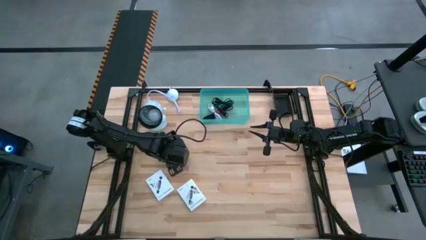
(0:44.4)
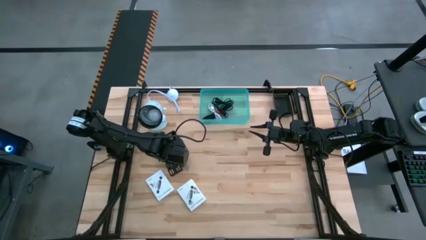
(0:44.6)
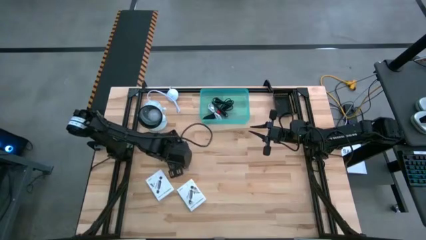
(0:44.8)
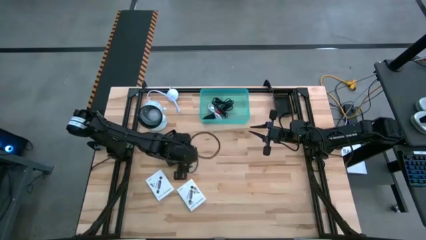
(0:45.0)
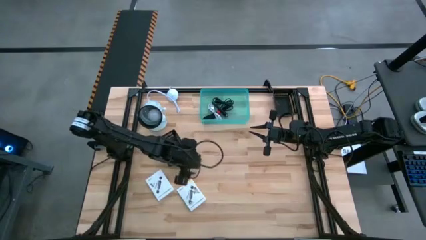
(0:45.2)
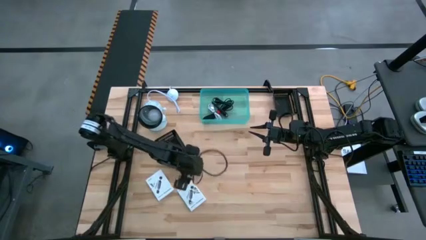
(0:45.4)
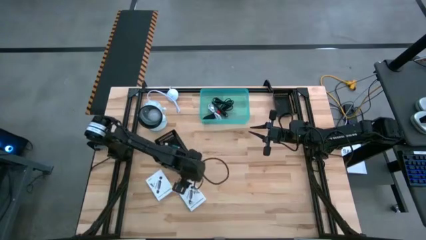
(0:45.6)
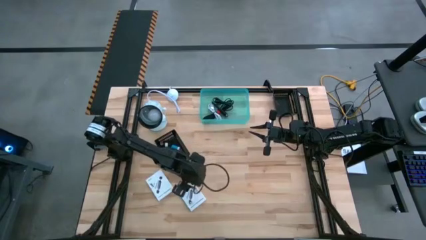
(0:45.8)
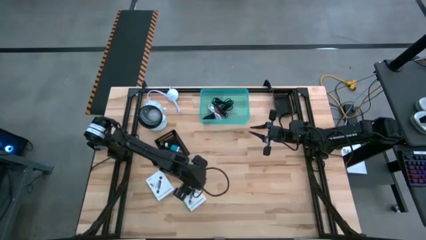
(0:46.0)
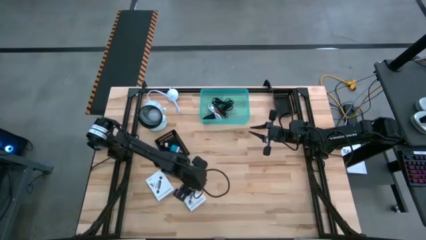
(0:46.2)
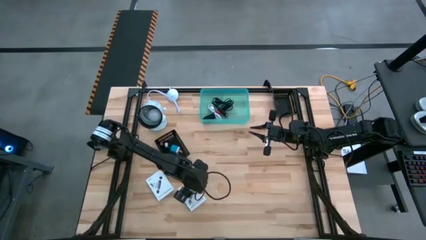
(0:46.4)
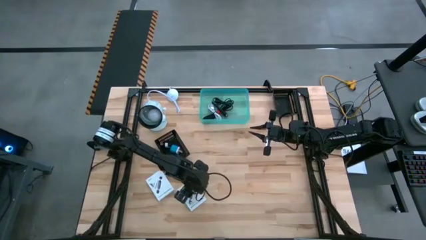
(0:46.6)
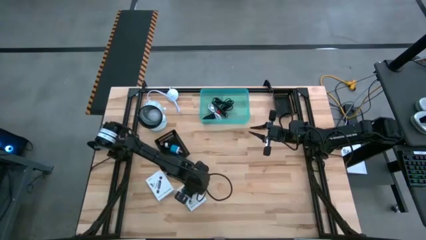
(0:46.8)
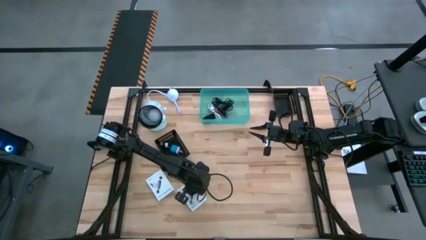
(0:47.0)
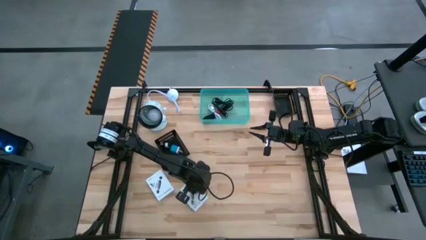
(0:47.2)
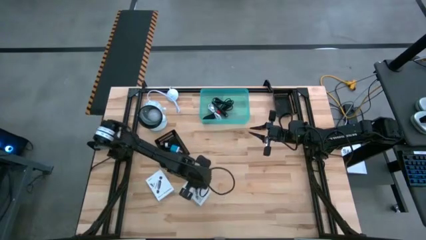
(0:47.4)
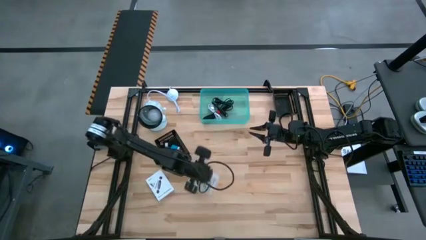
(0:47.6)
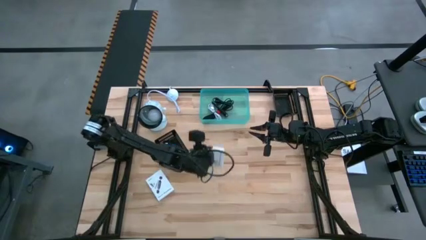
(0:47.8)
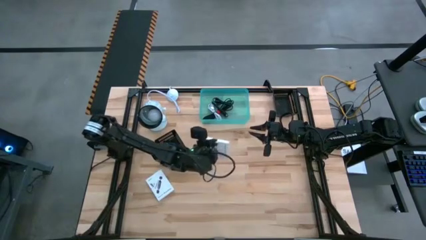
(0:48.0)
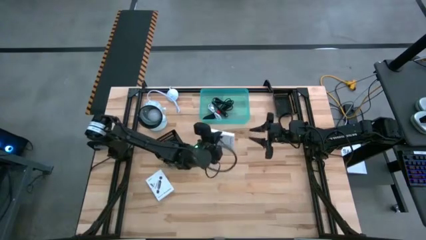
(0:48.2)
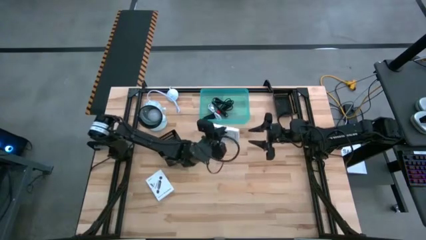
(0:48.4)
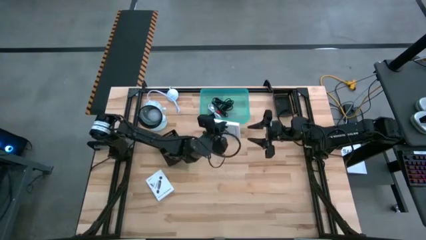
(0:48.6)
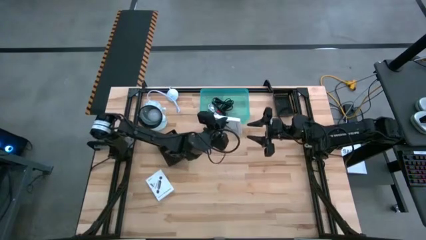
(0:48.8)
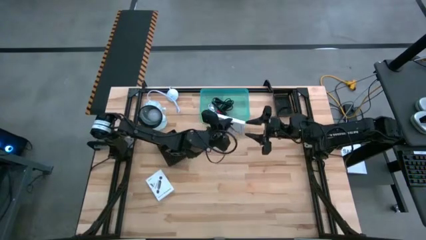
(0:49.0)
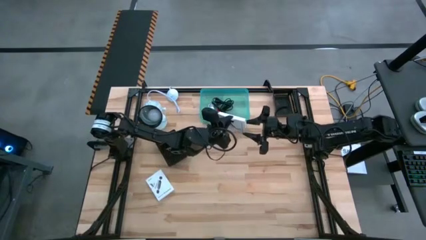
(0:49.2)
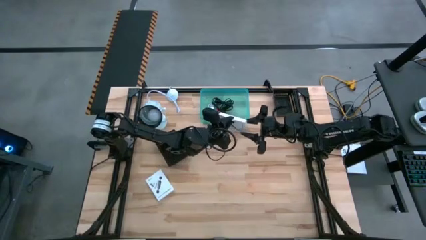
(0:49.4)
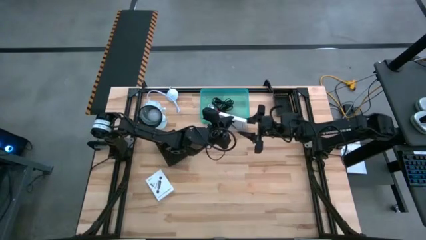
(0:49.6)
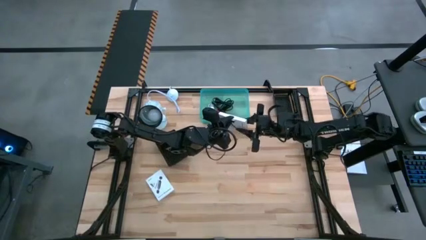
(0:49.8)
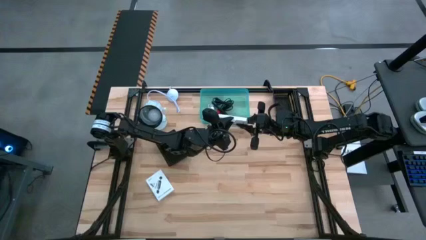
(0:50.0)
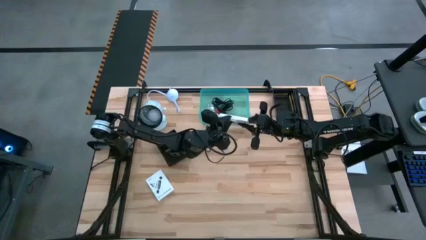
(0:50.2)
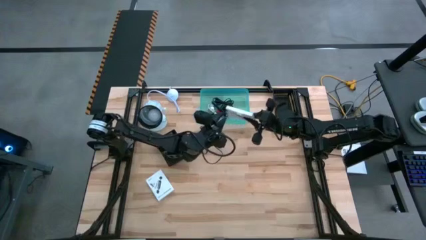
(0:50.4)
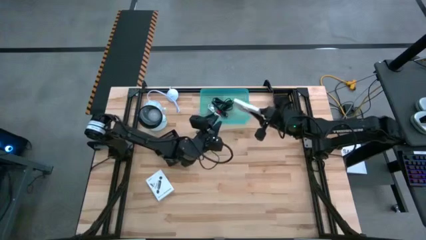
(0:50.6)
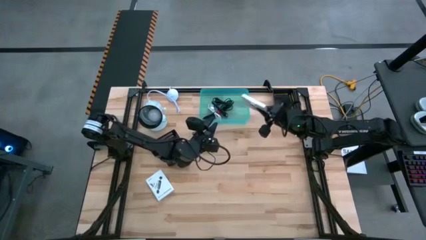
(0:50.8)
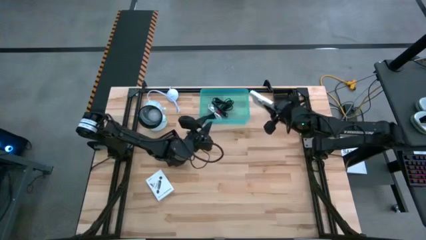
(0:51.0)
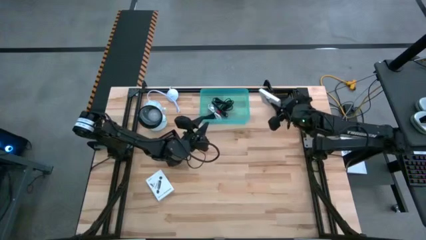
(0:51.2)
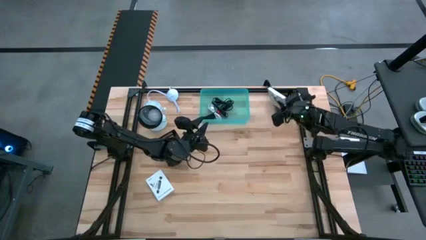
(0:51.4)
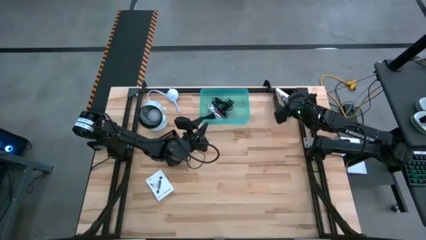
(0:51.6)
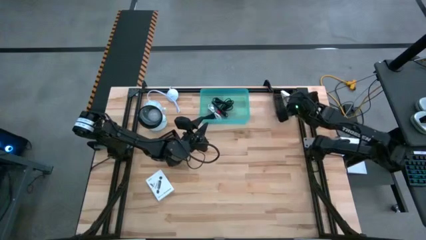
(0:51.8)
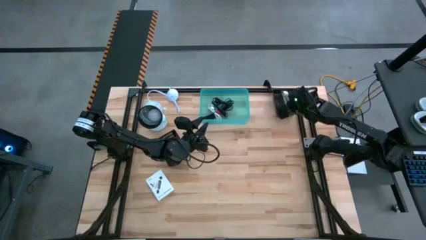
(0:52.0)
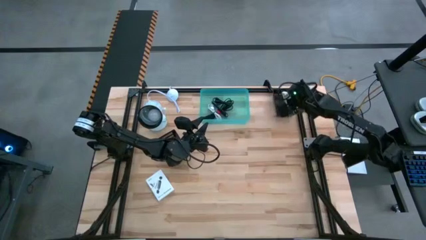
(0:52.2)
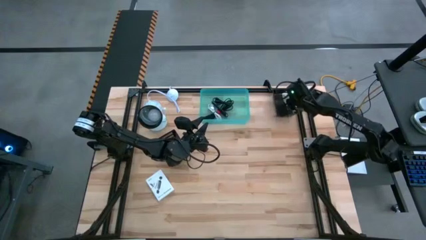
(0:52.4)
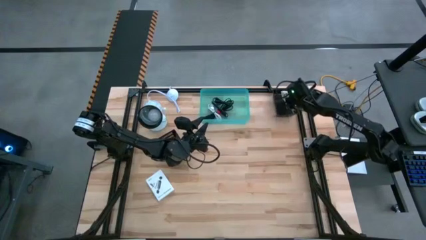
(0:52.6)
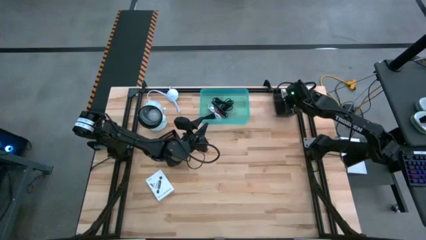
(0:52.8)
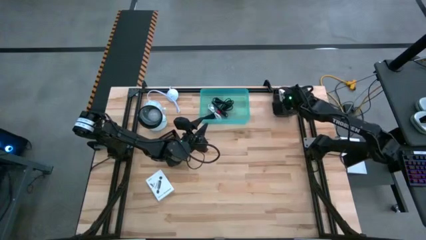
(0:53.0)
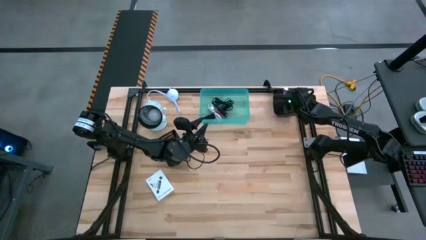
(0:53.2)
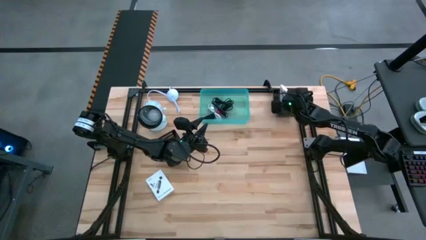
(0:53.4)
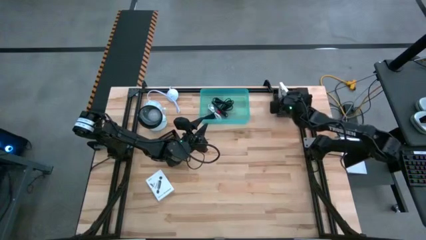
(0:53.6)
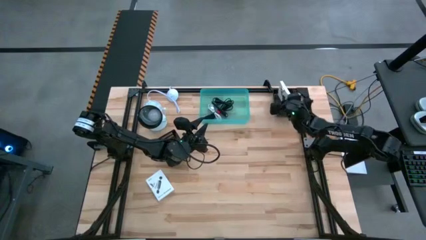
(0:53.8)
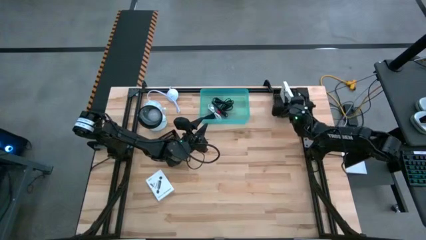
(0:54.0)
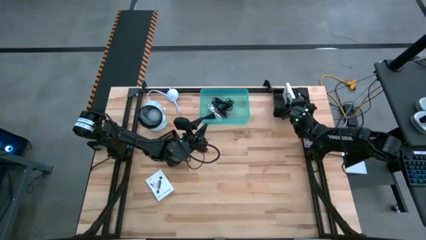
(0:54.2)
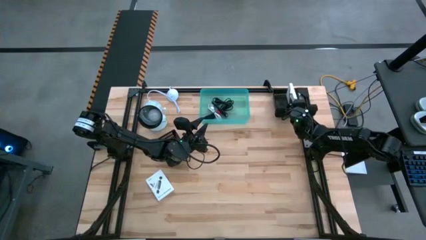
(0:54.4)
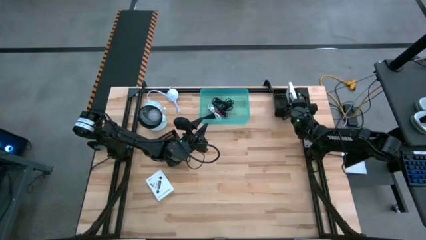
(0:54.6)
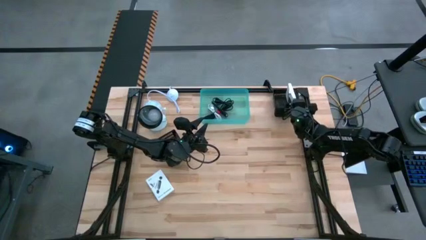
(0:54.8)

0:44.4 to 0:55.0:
Task: Pick and place items into bin
Put the right card reader box into the right black basket
